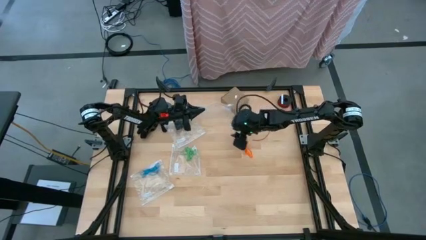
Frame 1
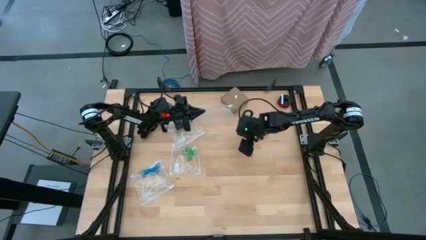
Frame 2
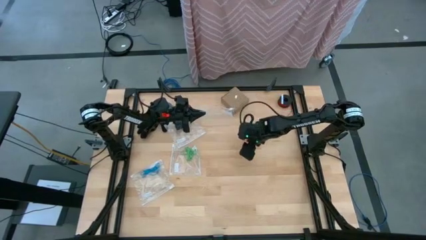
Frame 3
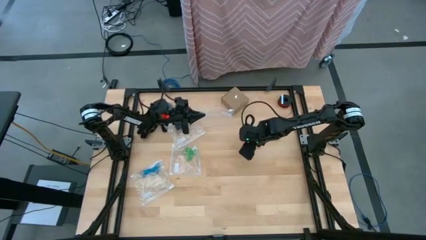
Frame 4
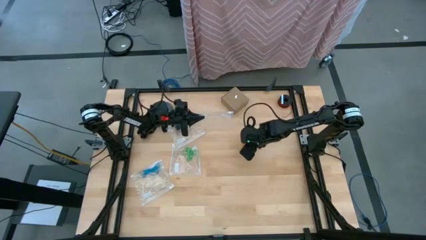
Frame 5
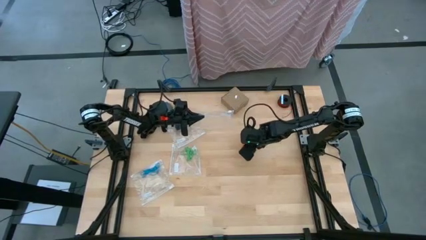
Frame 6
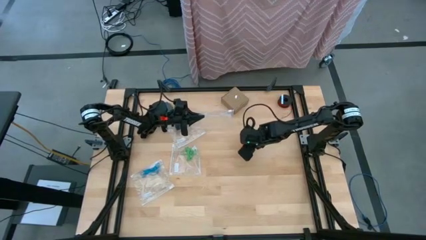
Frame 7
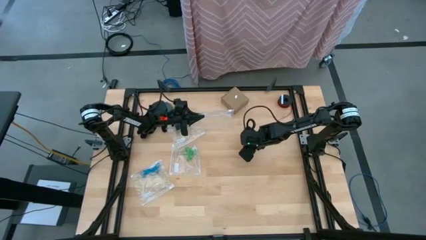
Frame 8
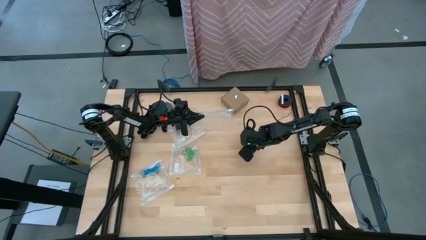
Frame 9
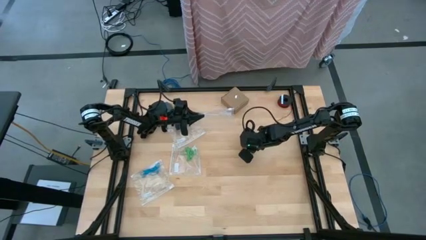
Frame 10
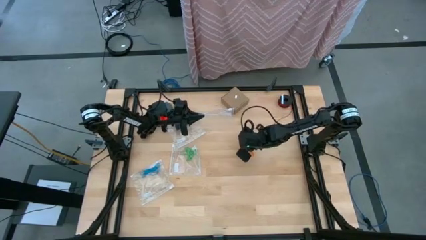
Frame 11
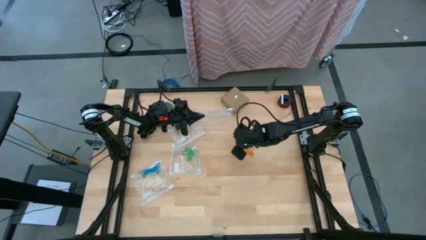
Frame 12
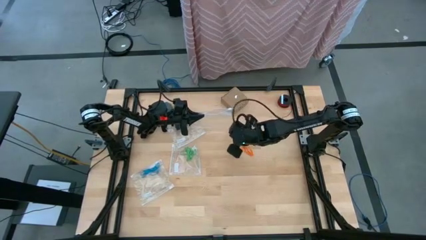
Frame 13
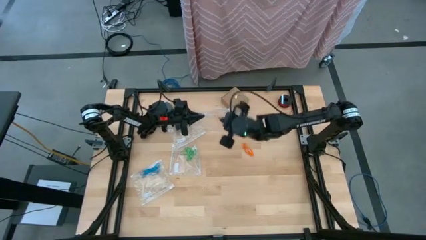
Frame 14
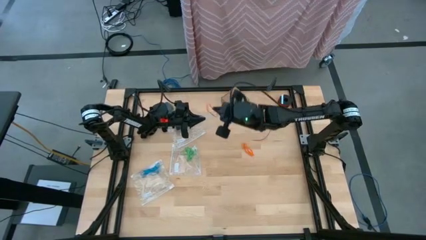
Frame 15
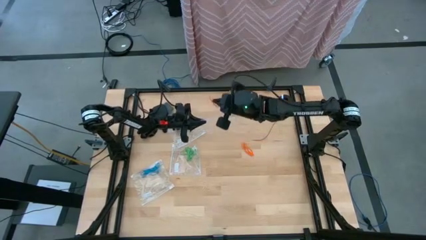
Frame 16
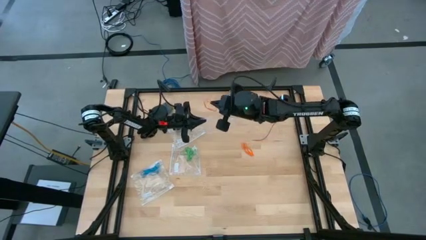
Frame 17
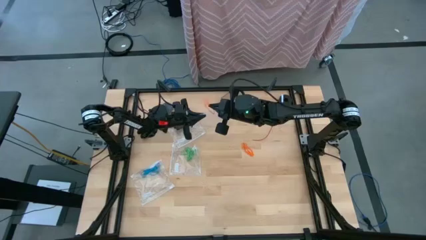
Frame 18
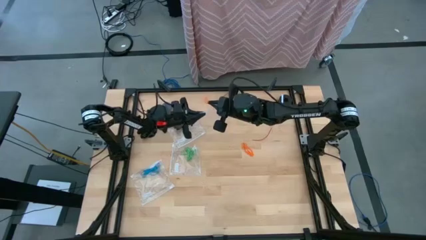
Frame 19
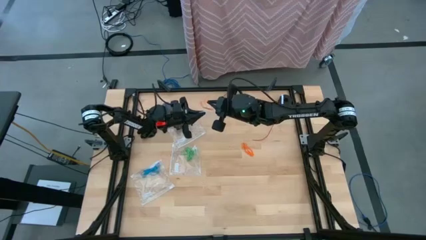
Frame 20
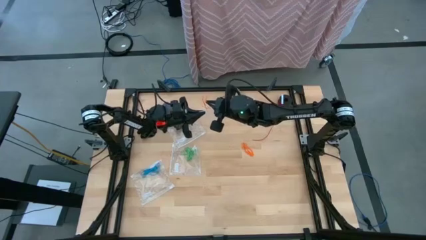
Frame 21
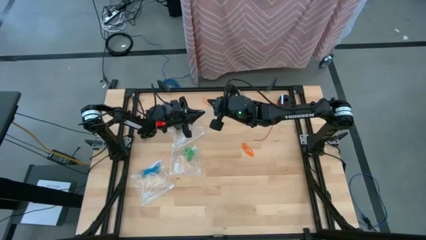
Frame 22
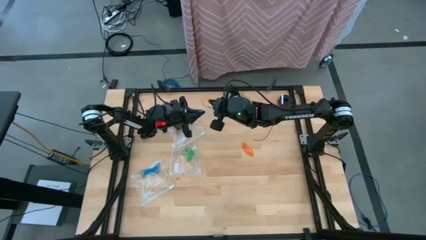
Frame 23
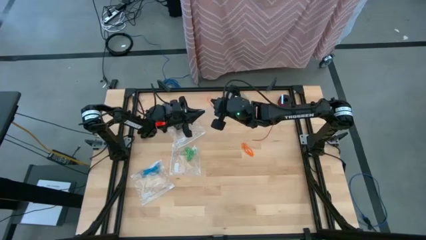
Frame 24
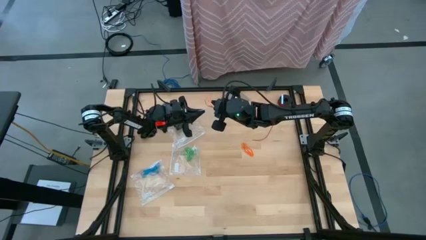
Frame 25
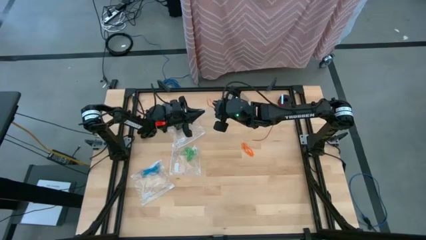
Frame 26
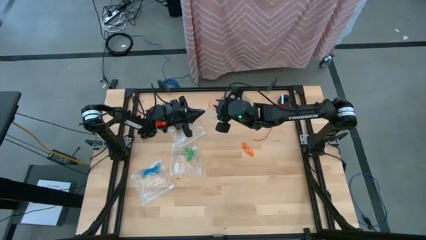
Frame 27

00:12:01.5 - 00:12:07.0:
Task: Sort rubber bands
Put the orange rubber band into the transparent zip bag

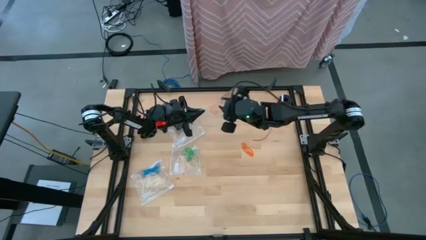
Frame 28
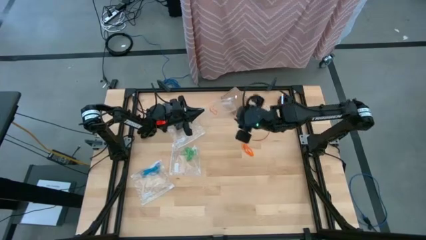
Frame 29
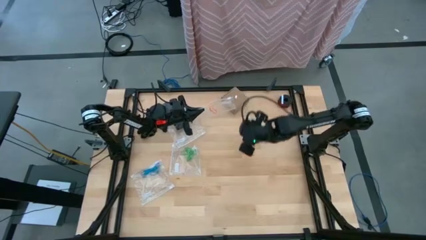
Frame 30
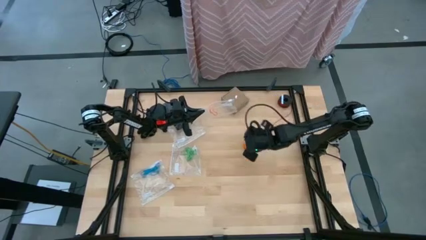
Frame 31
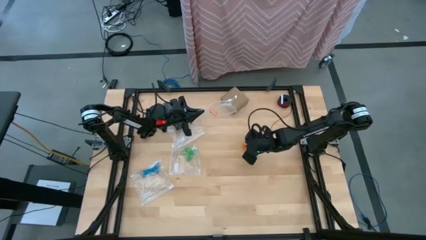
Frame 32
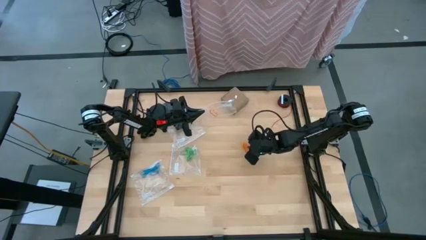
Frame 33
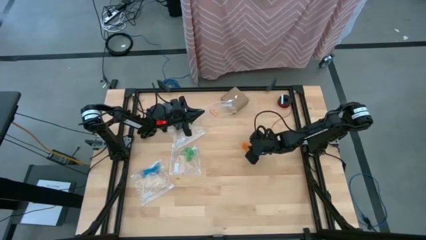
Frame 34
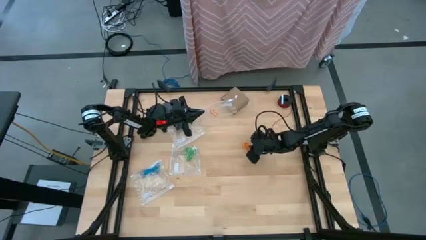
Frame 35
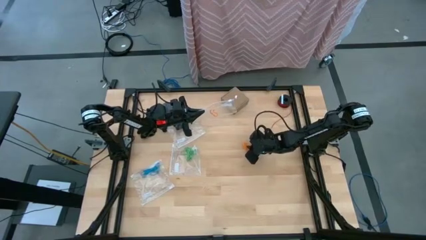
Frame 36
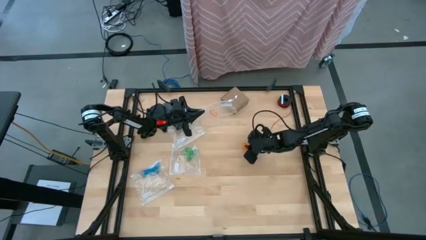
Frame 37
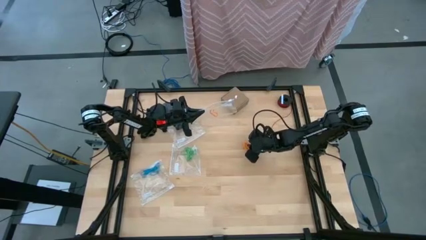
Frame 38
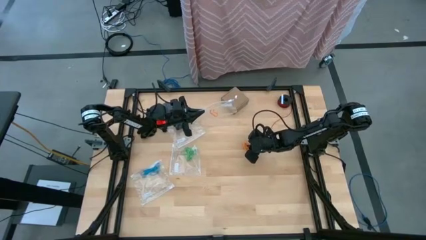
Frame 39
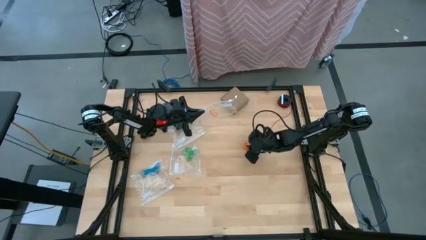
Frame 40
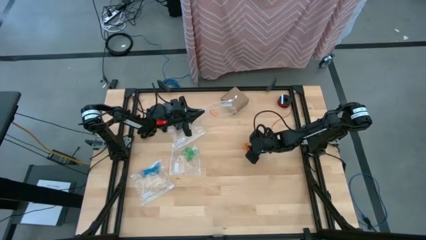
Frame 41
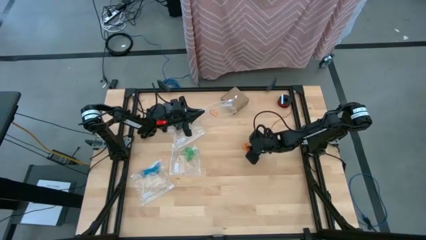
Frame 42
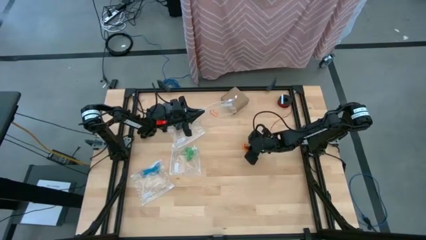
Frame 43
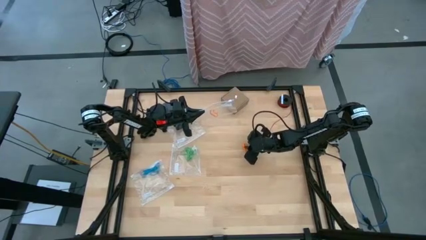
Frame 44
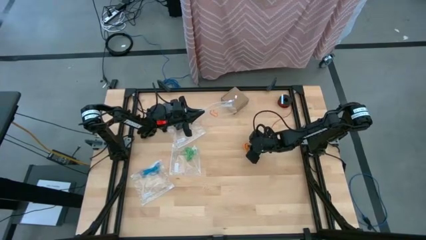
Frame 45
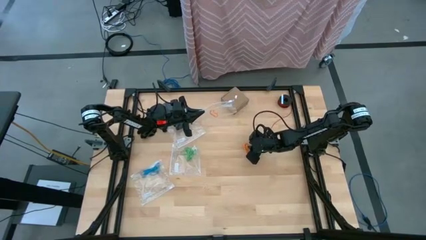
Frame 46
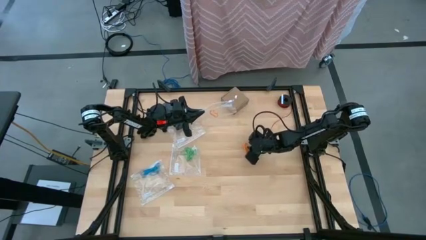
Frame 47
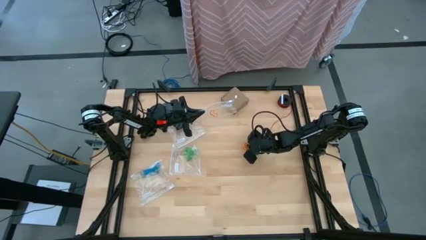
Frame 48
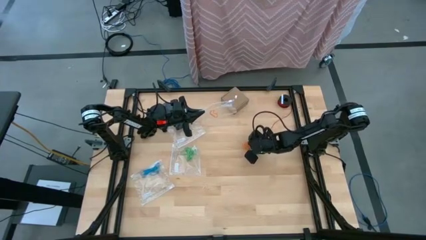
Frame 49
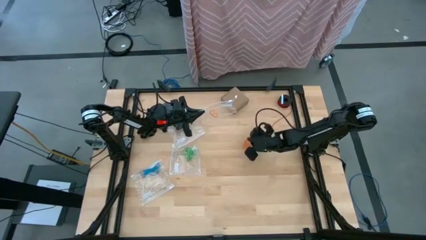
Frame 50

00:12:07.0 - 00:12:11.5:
Put the orange rubber band into the transparent zip bag

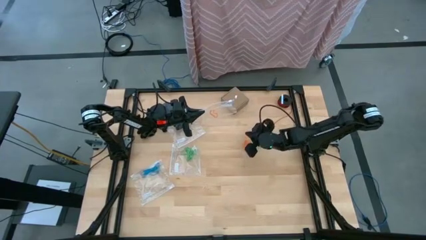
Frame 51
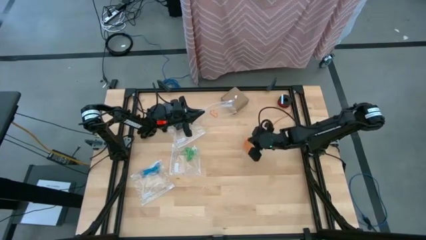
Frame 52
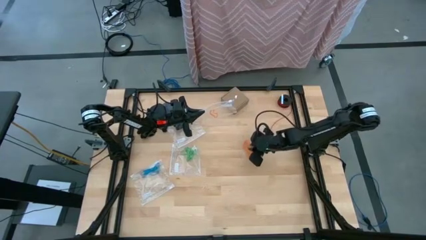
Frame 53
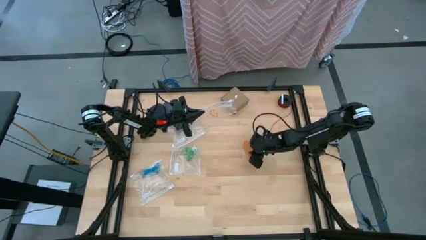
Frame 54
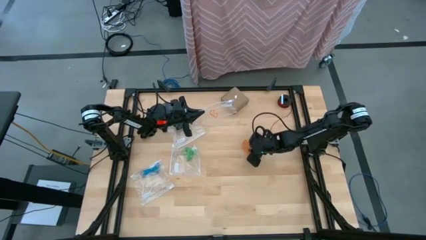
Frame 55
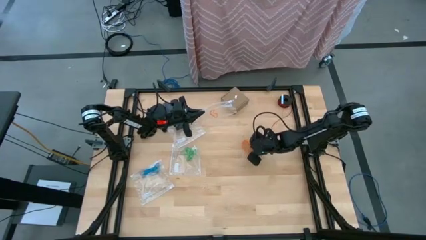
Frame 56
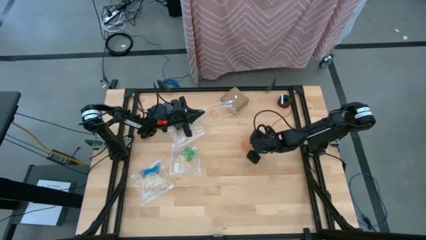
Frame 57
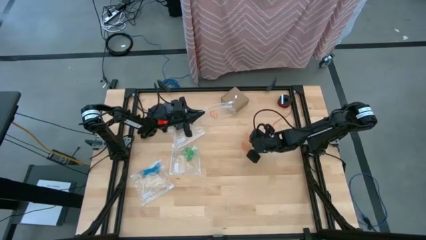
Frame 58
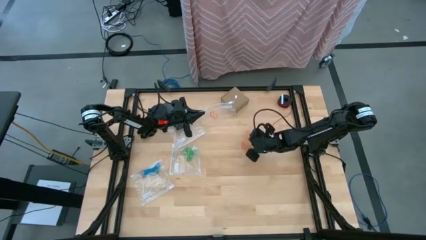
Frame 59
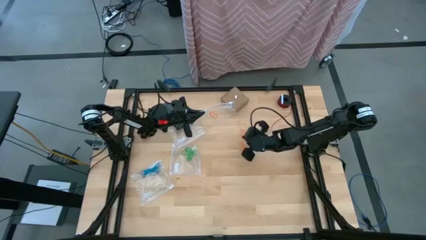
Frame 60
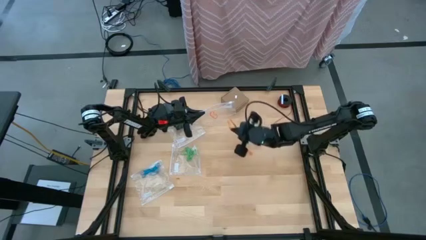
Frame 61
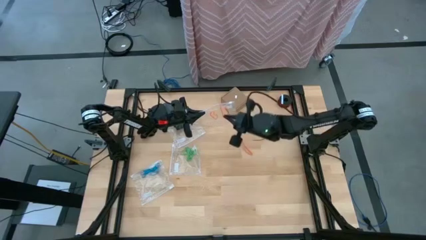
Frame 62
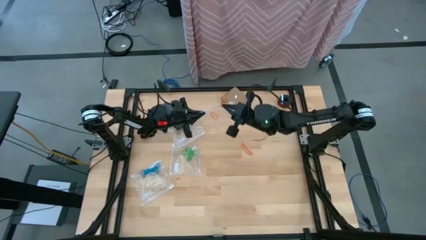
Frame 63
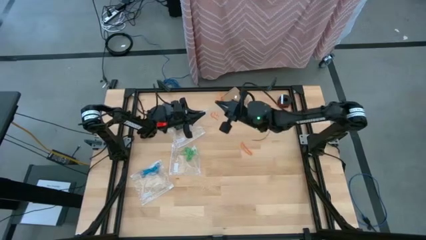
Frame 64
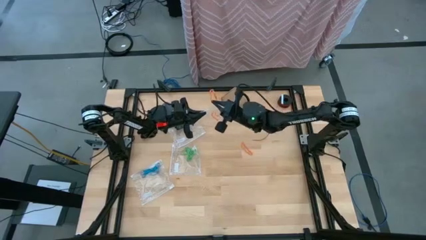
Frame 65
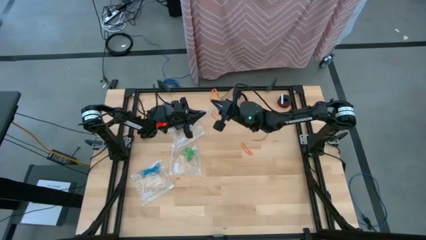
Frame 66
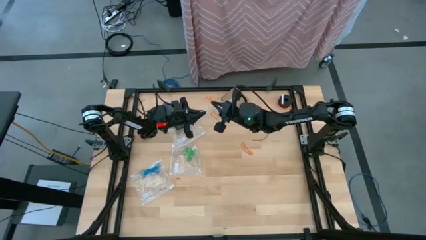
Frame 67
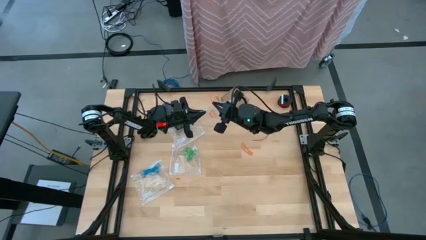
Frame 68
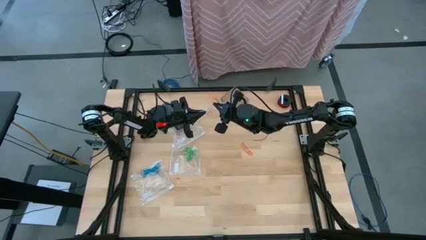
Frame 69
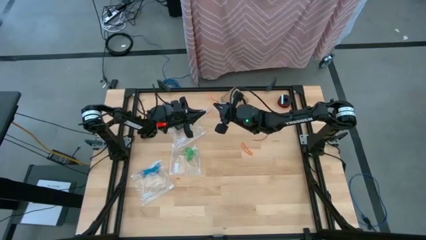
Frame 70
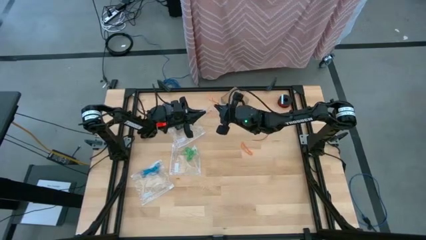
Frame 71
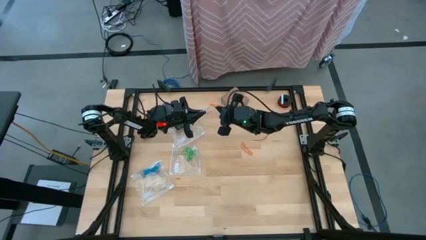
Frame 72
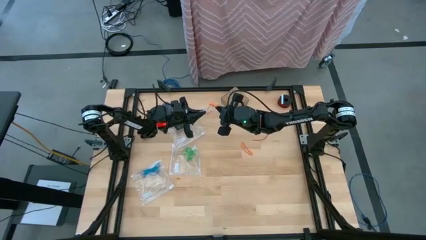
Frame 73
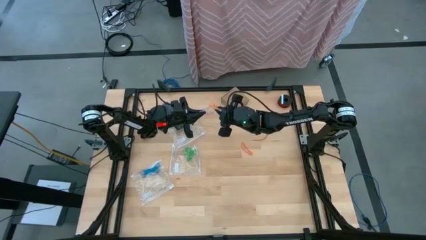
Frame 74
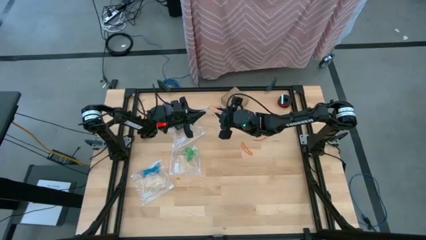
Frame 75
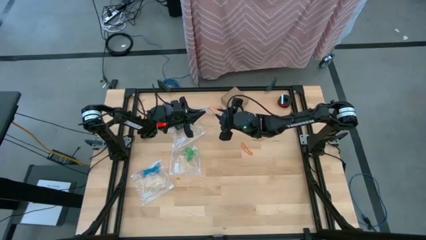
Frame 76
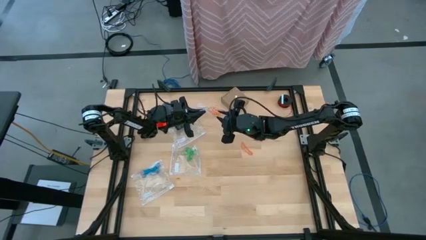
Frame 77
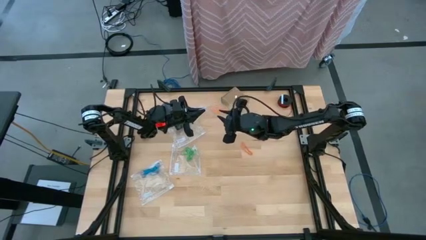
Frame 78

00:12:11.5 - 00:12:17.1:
Put the orange rubber band into the transparent zip bag

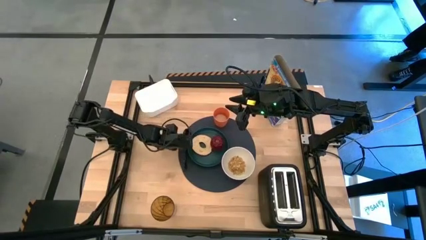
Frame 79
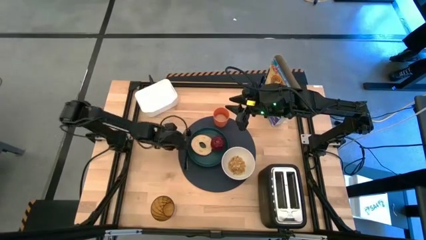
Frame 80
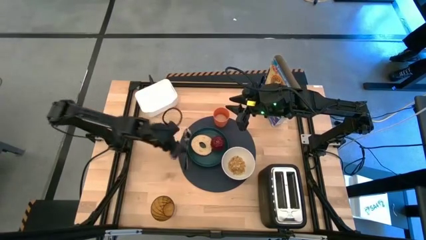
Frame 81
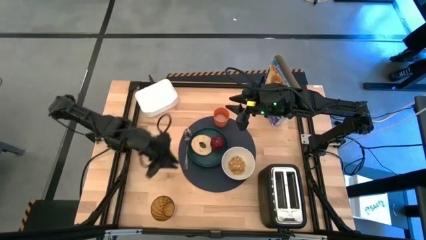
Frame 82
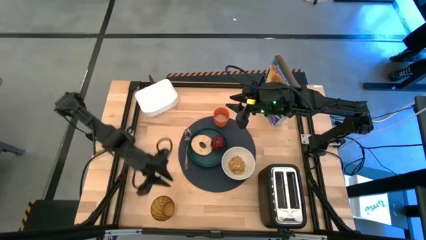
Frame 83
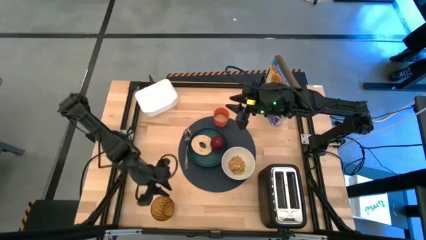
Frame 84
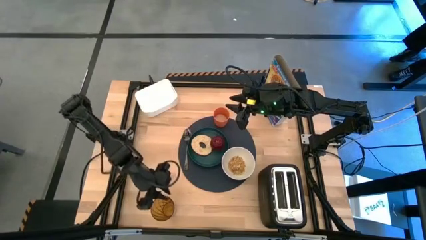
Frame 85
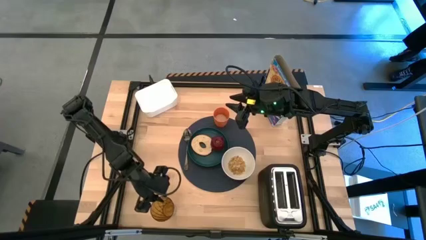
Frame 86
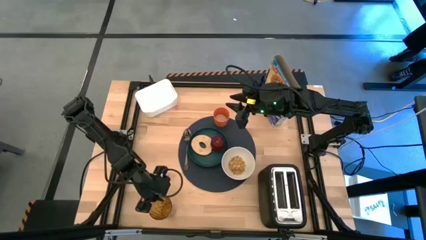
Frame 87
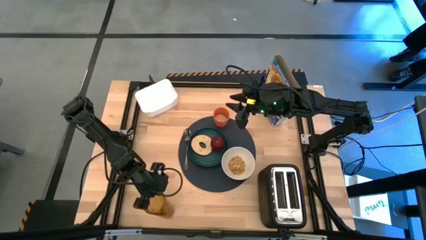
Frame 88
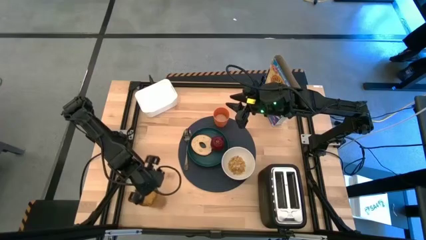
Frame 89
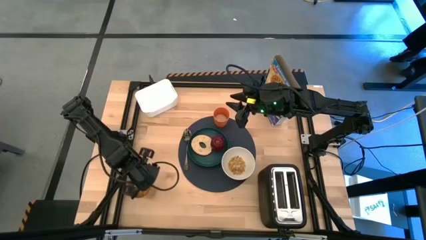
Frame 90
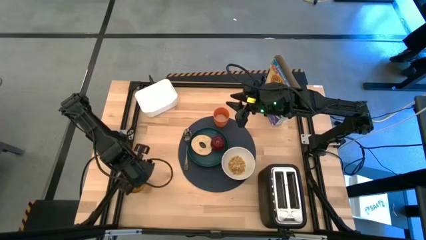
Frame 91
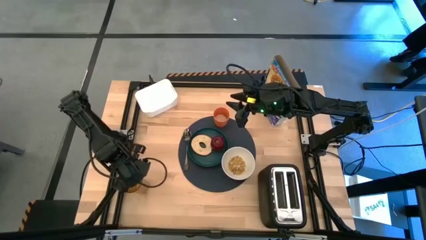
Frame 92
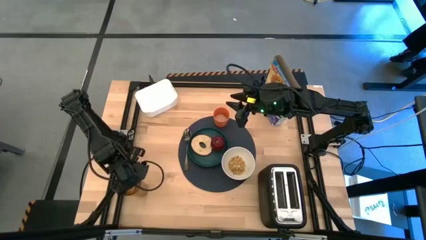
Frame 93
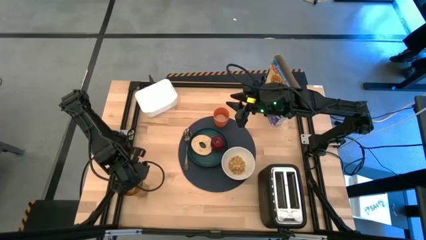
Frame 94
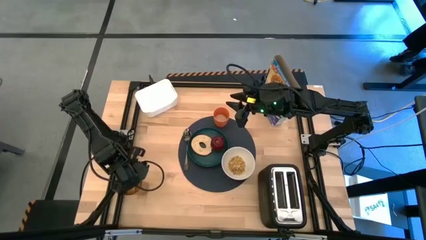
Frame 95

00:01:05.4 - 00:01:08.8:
Task: Arrange a breakfast setting
Adjust the yellow cup
